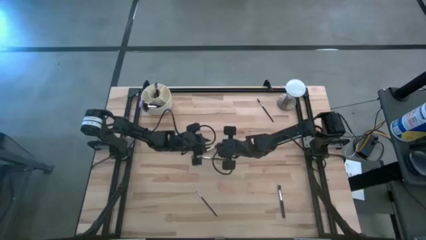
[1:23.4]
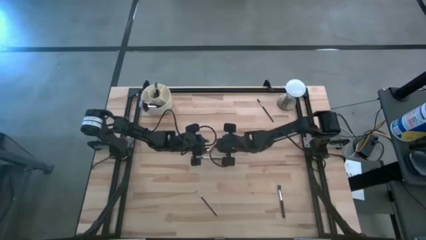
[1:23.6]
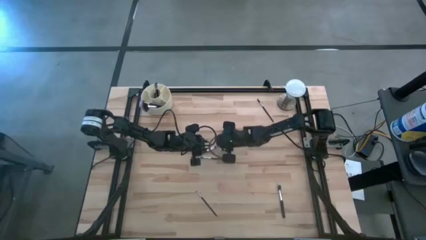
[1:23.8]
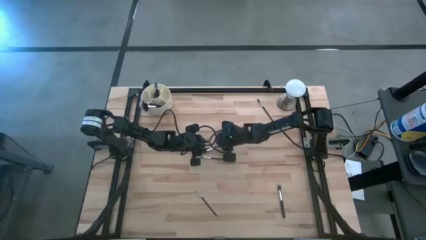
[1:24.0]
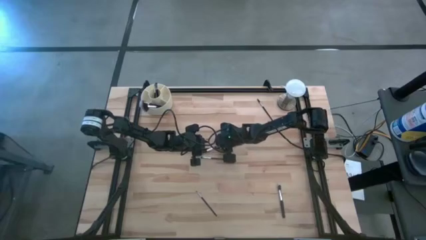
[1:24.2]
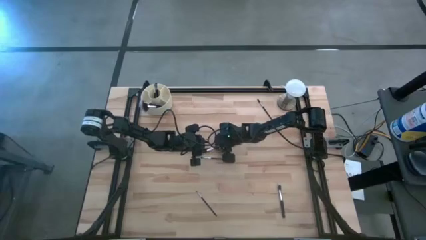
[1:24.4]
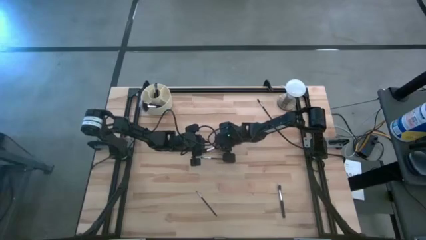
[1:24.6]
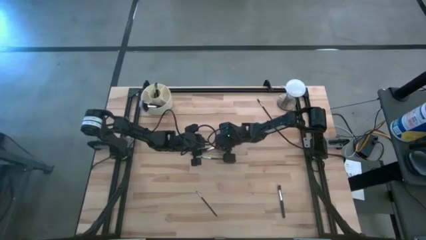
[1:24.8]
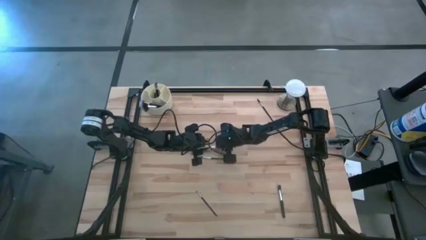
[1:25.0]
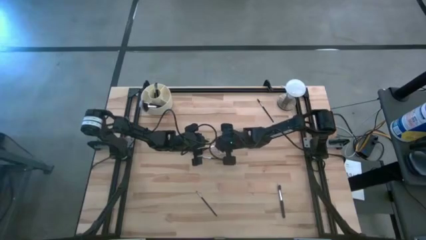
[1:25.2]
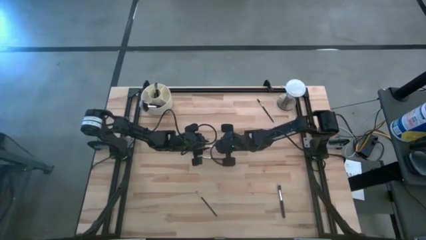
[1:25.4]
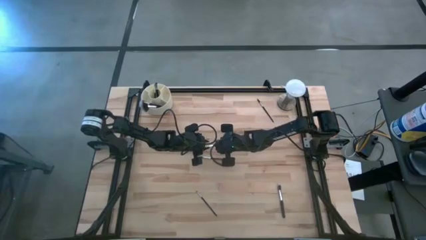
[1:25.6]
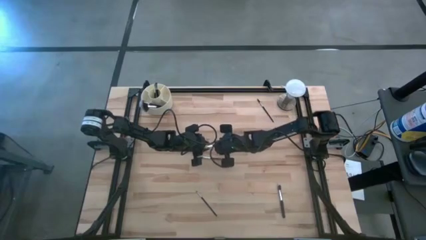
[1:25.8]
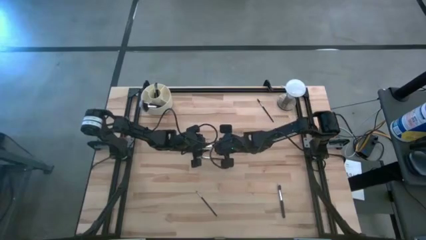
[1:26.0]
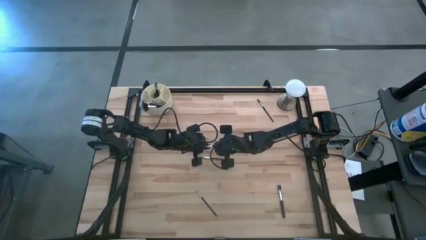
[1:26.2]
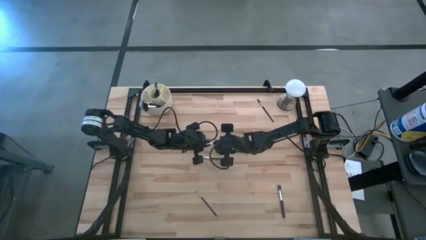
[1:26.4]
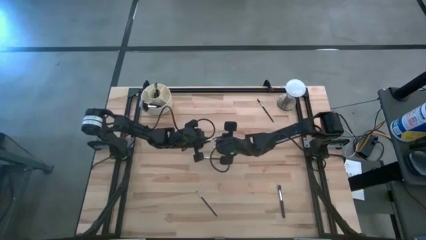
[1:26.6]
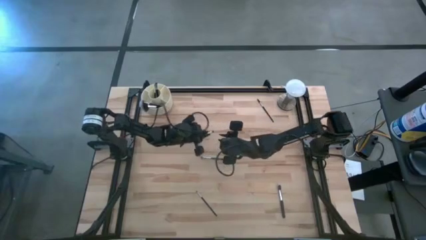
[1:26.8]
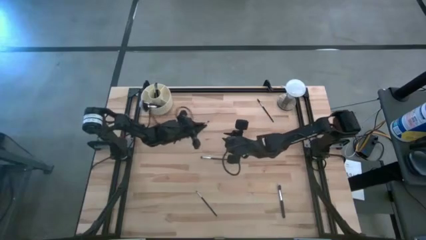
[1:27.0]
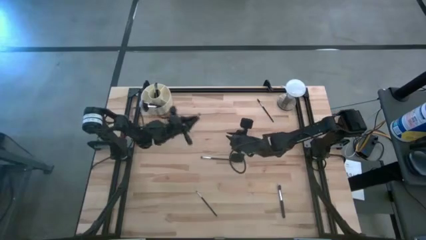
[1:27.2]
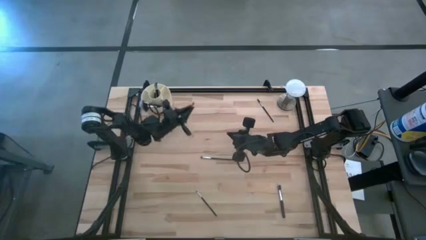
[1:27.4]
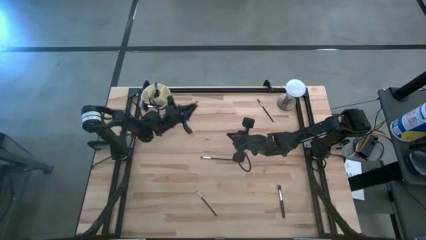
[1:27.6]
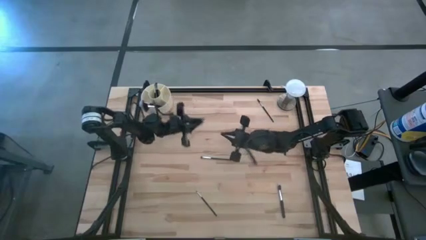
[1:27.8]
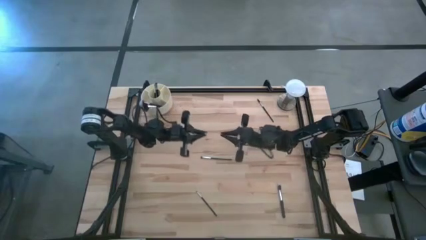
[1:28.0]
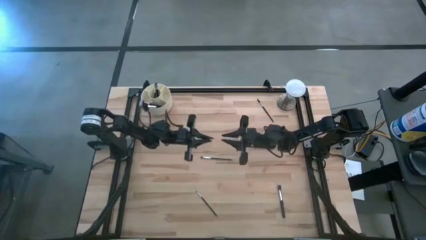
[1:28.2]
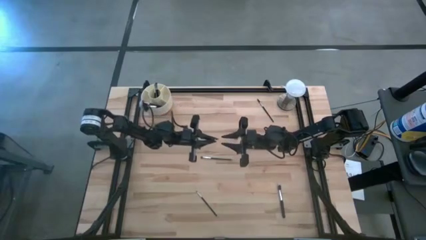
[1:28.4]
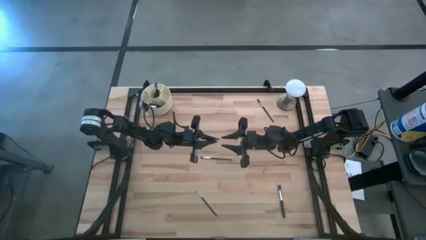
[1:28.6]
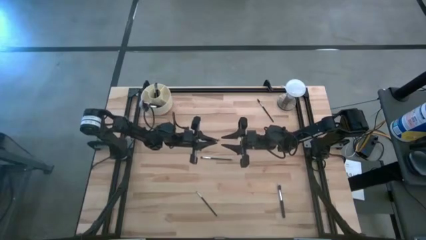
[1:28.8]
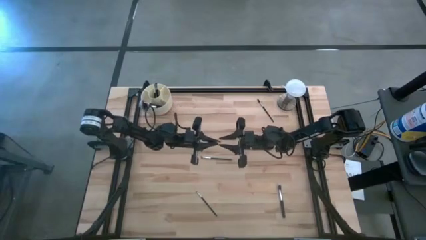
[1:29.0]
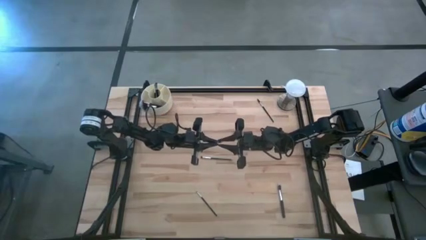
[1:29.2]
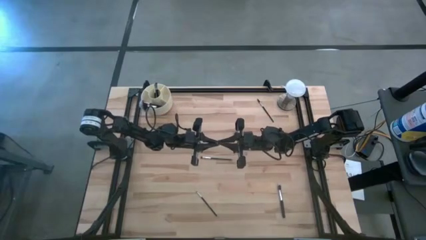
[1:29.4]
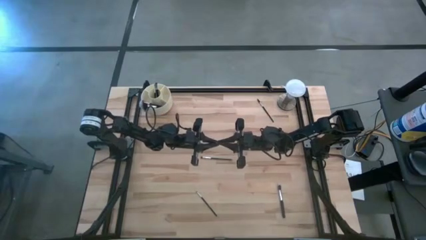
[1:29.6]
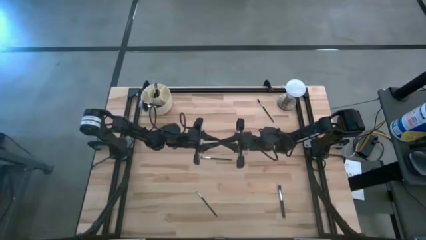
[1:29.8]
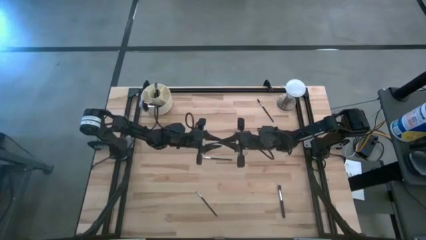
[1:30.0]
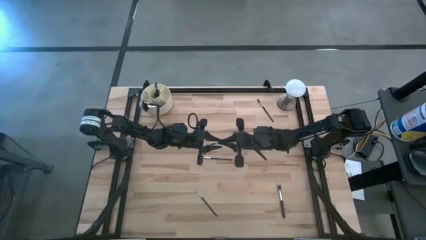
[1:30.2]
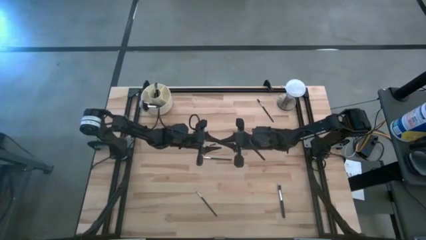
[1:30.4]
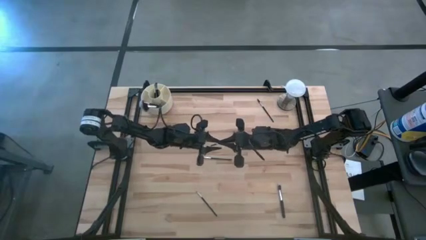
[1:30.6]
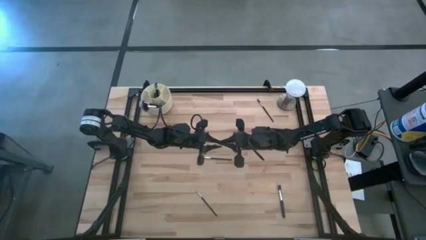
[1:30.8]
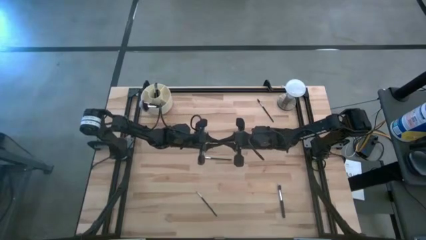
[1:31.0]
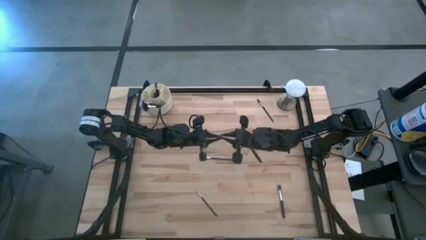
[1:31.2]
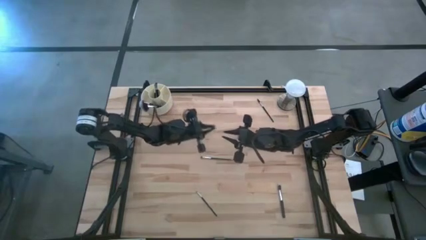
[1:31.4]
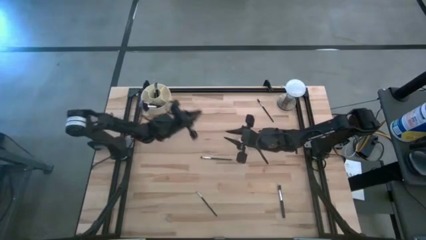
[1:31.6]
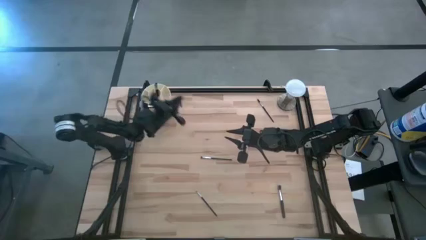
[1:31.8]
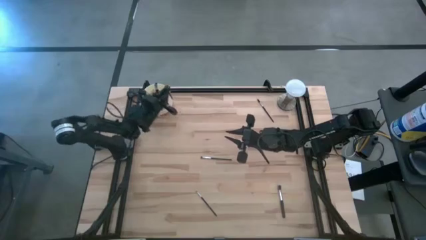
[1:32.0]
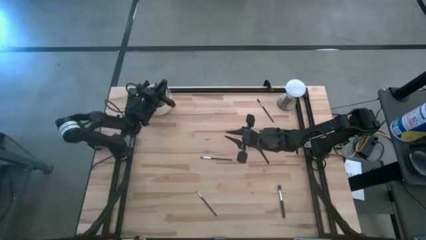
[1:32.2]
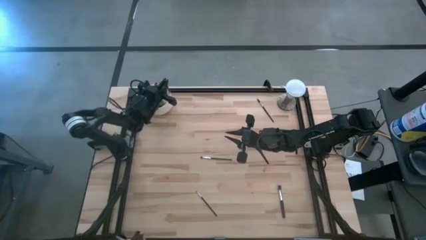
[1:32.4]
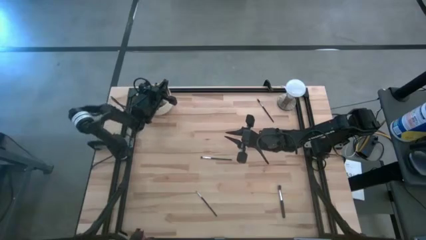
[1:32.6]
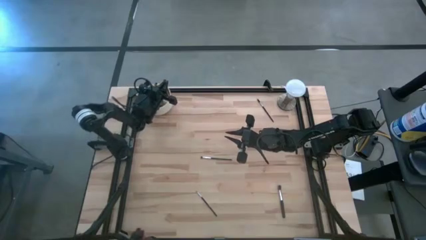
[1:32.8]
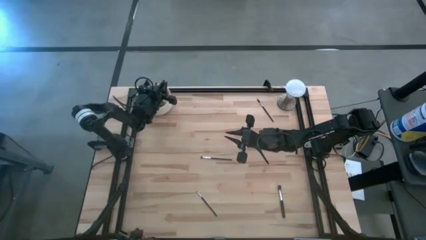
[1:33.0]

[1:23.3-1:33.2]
Task: Put items in baskets/containers
Put the eyeshadow brush into the organizer

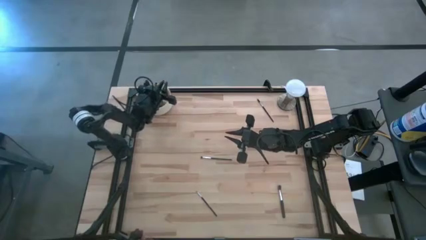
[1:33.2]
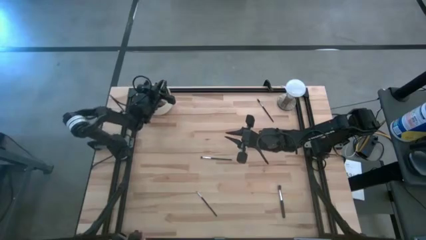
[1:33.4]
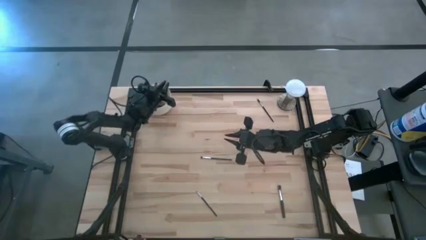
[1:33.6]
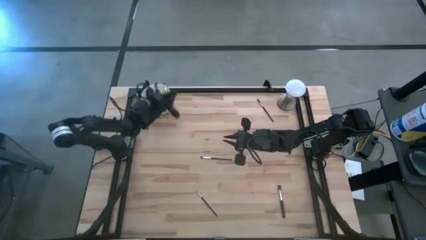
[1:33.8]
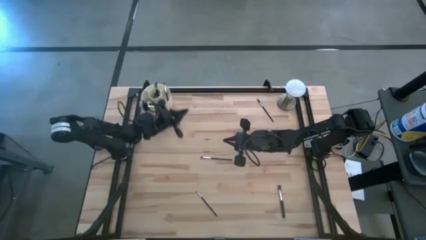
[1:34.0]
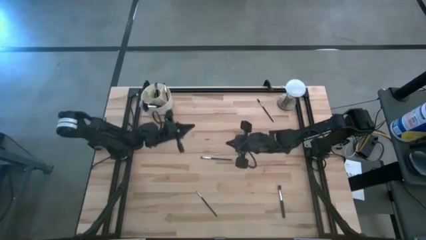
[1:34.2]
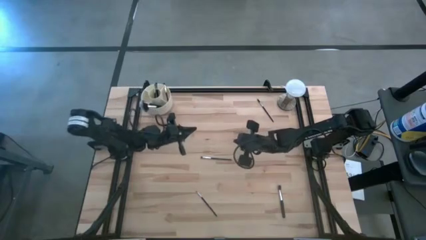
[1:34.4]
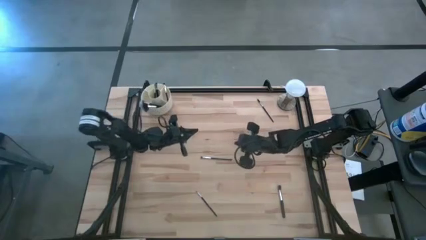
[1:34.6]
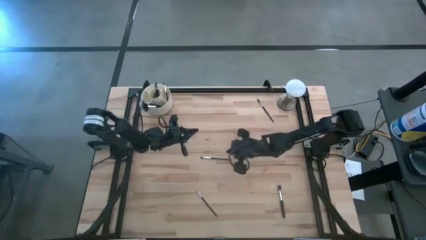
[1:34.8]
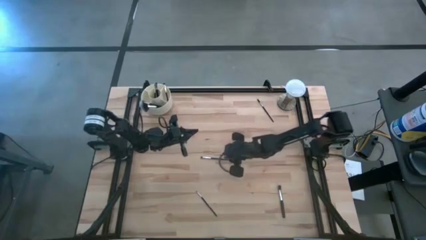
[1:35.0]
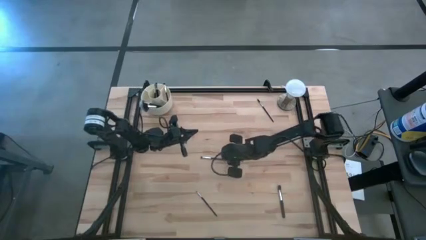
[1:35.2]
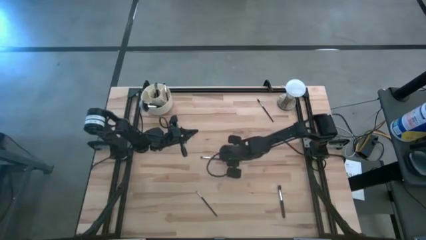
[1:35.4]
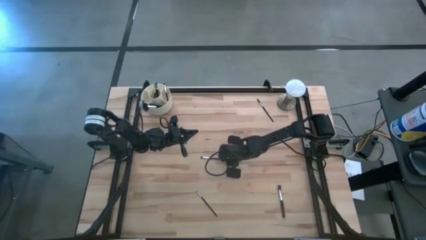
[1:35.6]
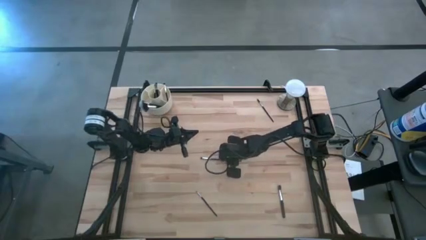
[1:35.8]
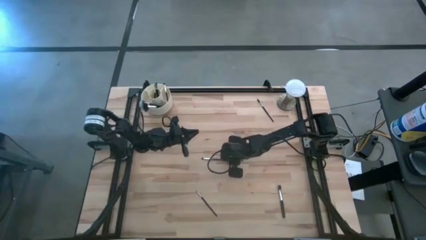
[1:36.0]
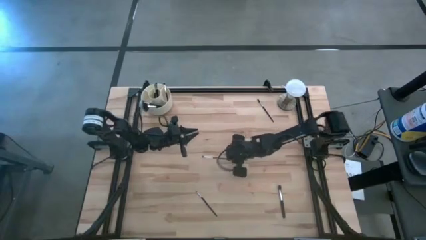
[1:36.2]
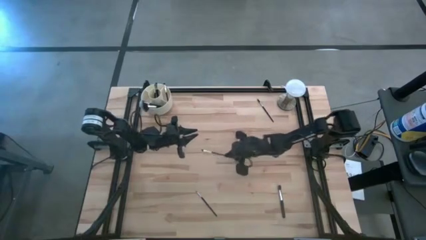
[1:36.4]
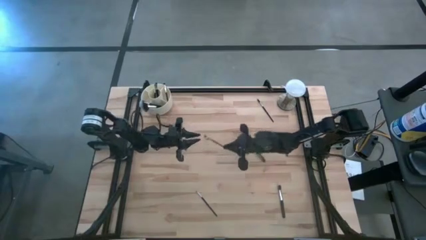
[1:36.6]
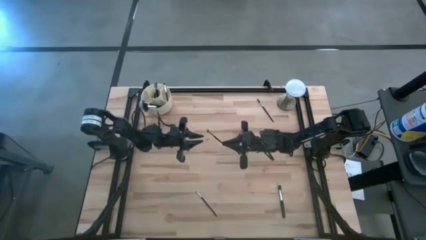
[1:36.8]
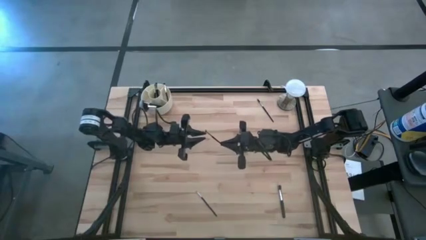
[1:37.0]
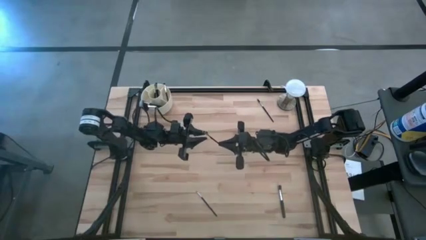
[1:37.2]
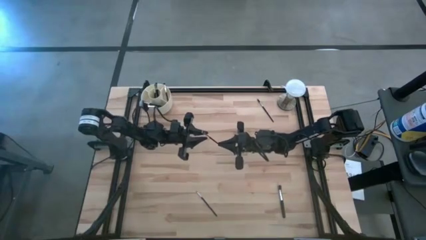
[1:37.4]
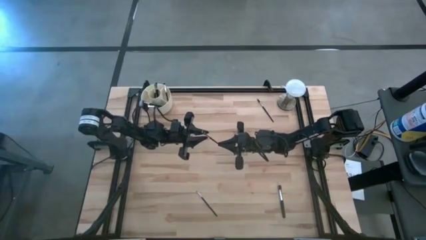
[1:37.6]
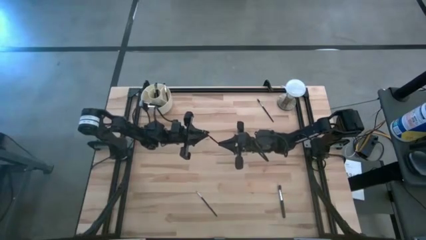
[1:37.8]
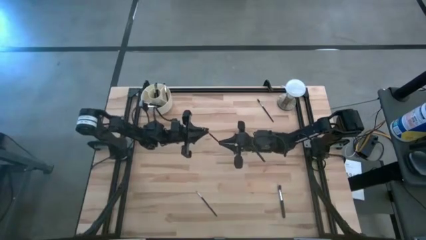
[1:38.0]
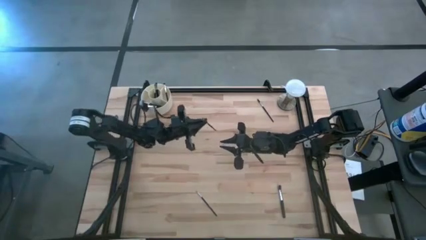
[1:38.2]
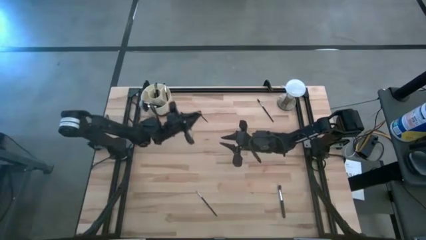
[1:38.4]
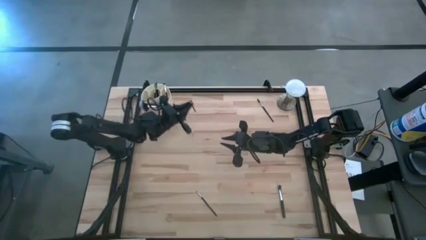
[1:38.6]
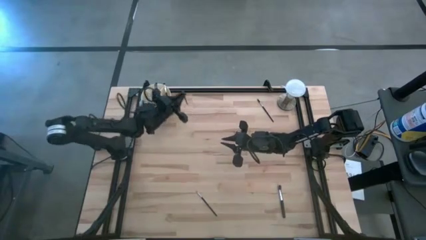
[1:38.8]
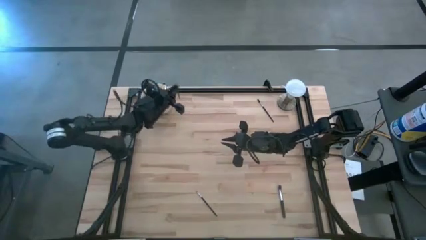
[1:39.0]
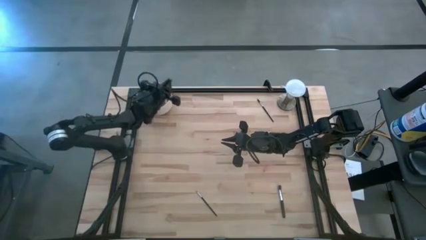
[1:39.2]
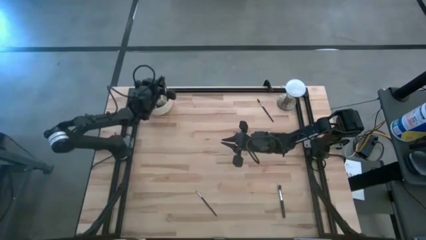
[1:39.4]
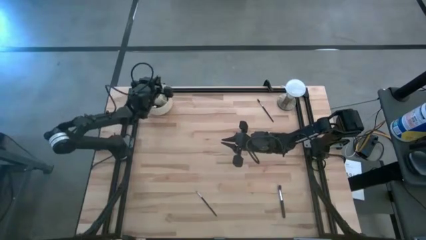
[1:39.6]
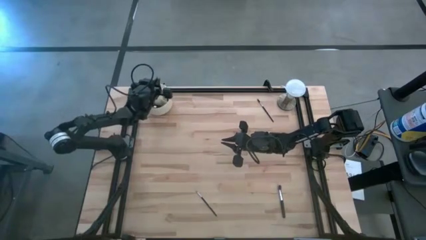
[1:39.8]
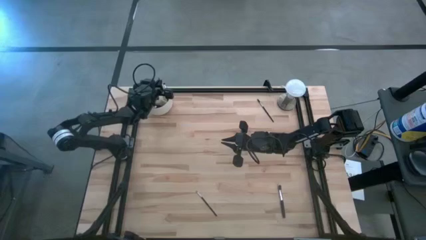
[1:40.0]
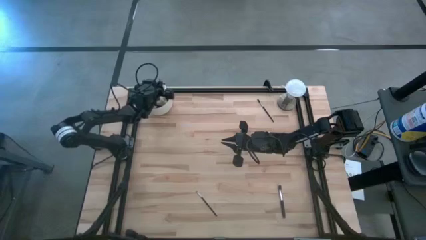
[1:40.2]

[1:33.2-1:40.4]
Put the eyeshadow brush into the organizer
